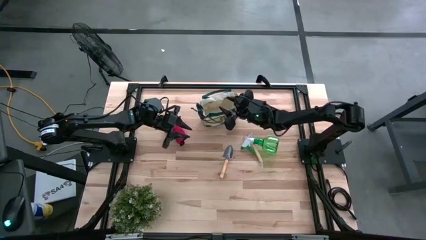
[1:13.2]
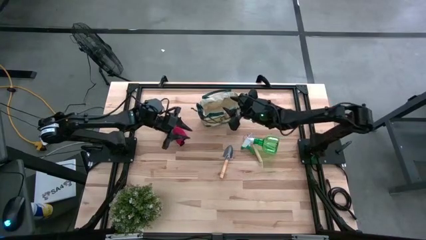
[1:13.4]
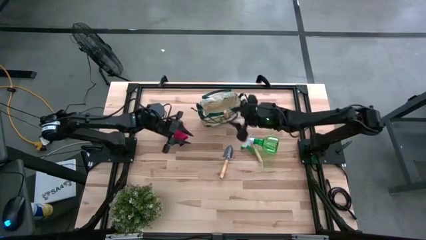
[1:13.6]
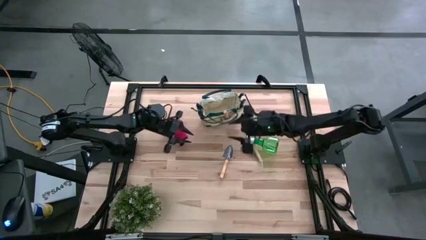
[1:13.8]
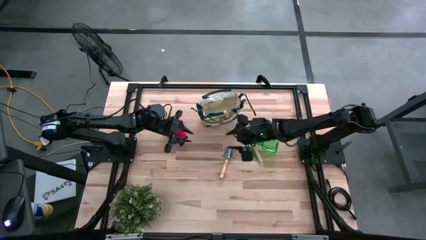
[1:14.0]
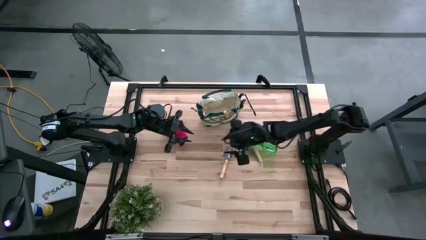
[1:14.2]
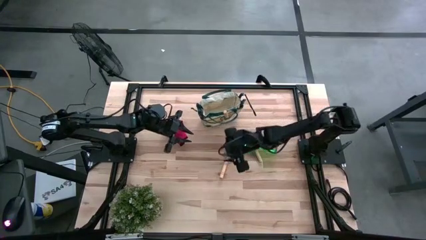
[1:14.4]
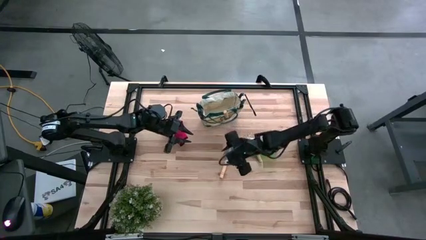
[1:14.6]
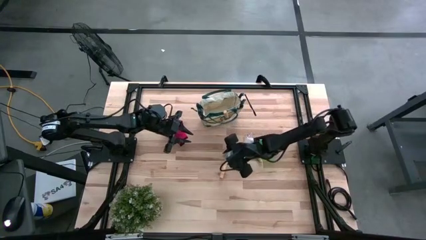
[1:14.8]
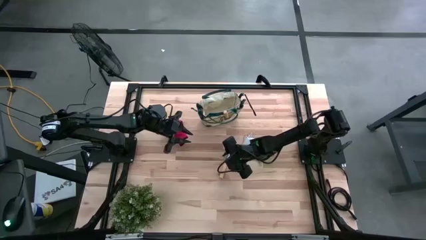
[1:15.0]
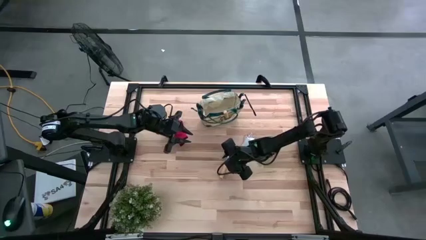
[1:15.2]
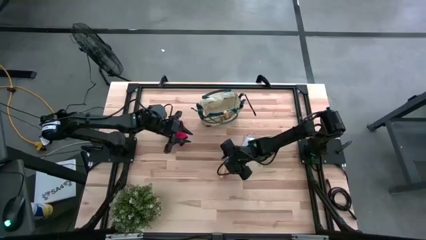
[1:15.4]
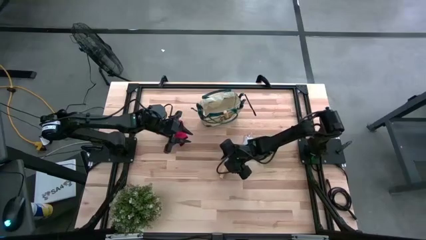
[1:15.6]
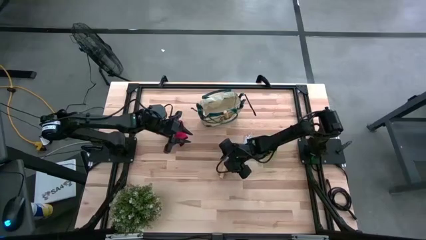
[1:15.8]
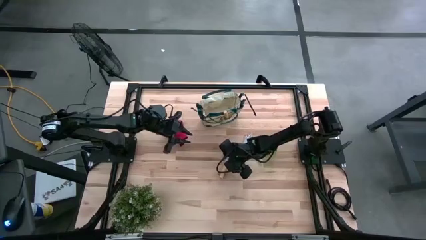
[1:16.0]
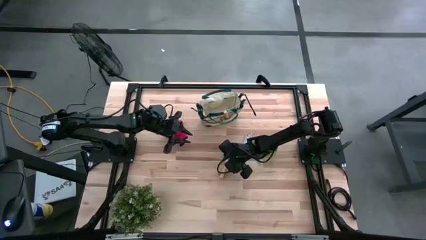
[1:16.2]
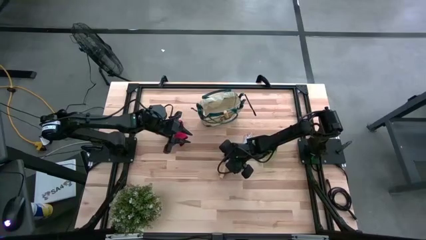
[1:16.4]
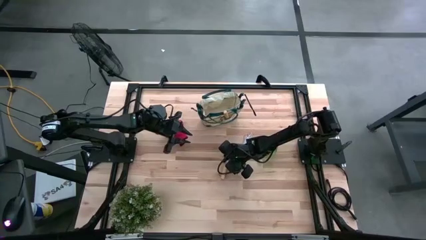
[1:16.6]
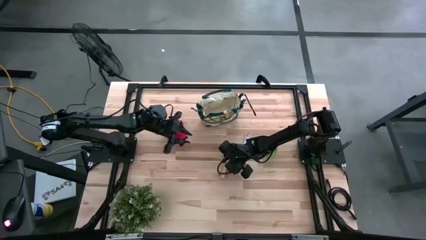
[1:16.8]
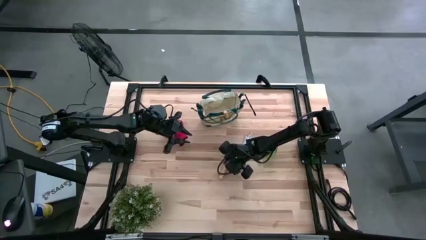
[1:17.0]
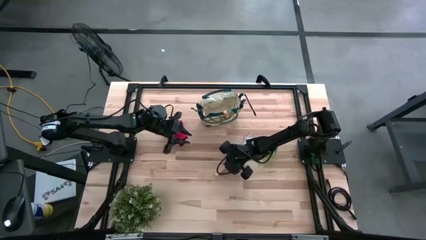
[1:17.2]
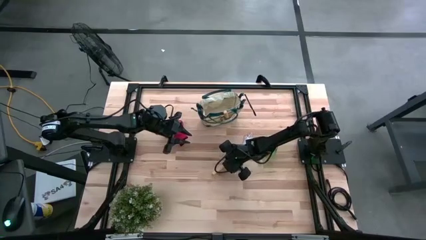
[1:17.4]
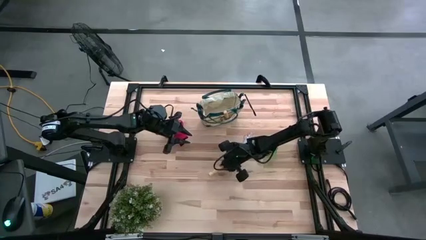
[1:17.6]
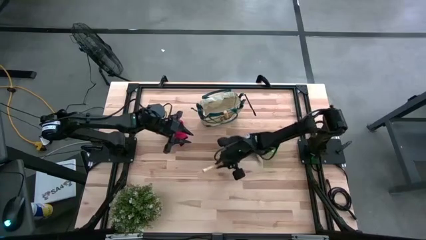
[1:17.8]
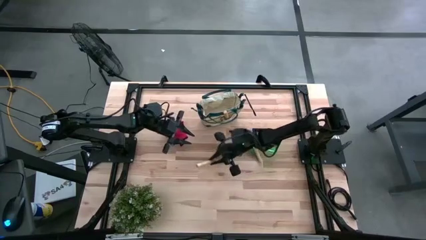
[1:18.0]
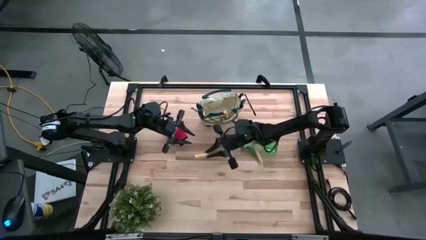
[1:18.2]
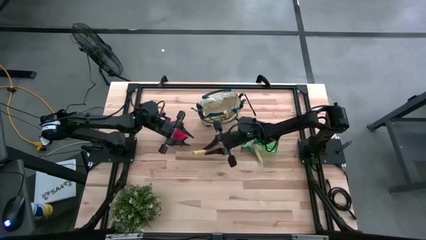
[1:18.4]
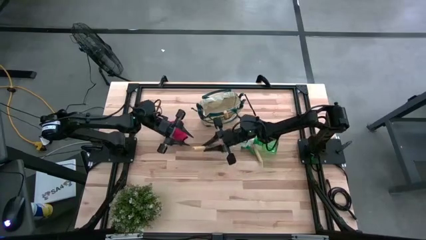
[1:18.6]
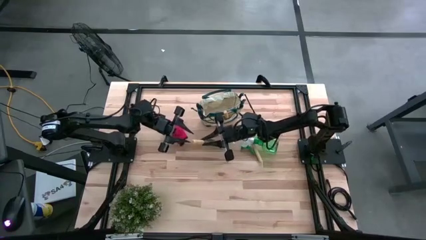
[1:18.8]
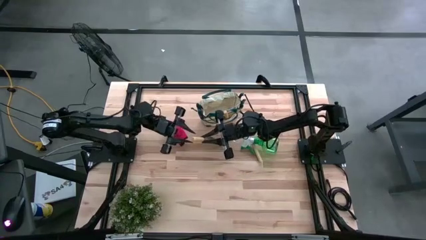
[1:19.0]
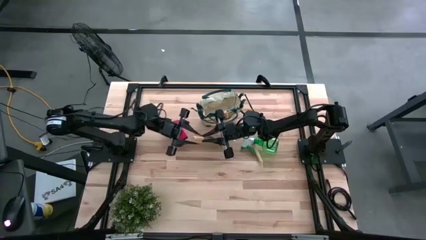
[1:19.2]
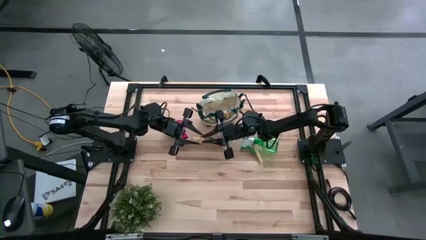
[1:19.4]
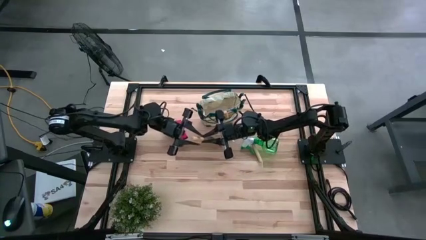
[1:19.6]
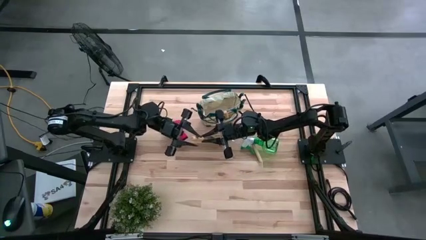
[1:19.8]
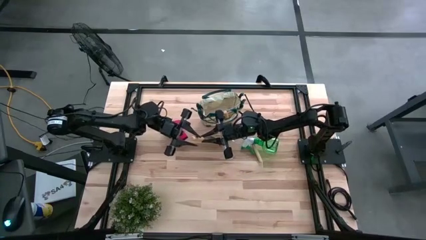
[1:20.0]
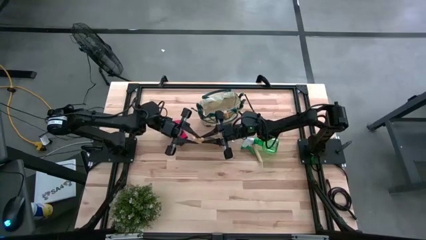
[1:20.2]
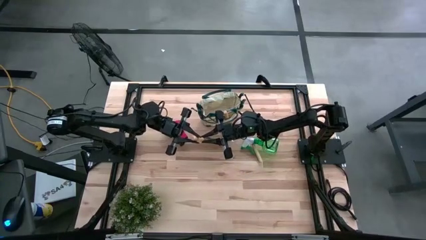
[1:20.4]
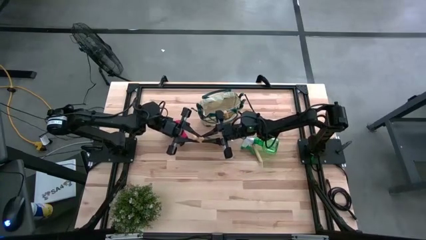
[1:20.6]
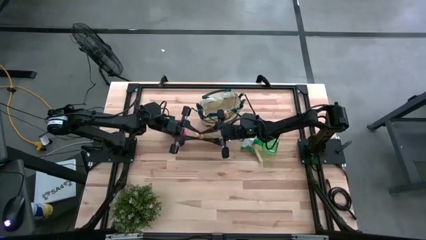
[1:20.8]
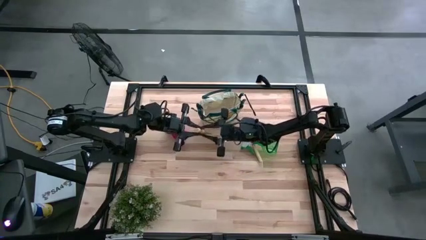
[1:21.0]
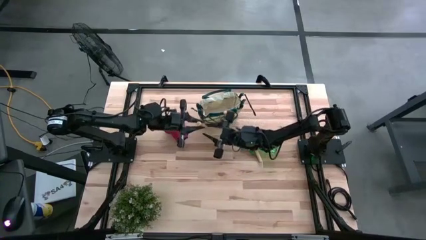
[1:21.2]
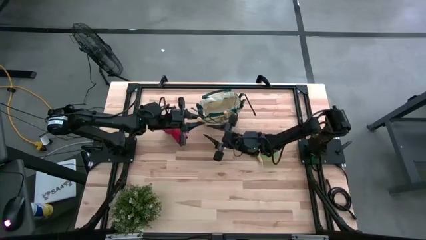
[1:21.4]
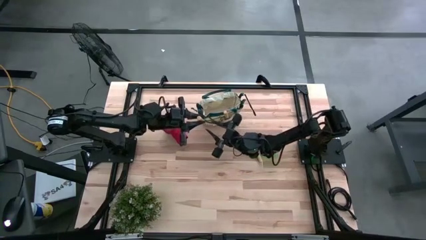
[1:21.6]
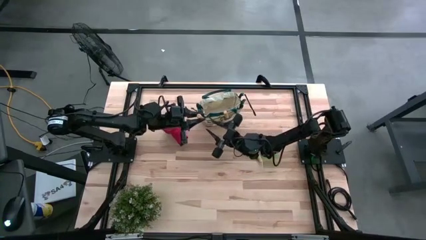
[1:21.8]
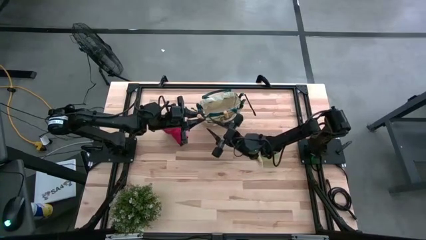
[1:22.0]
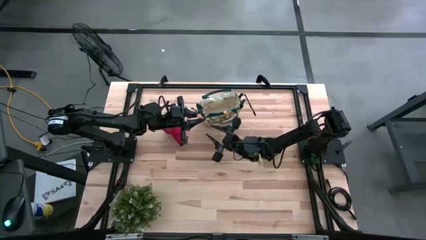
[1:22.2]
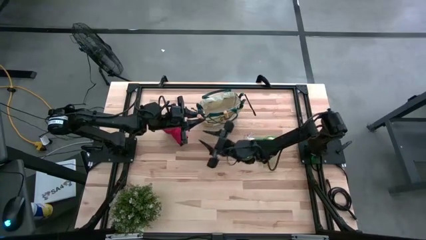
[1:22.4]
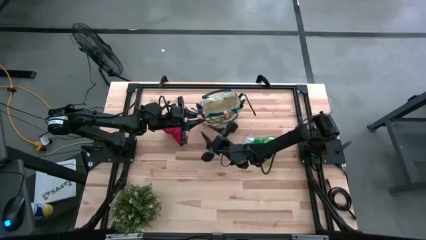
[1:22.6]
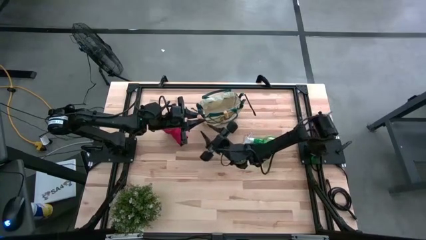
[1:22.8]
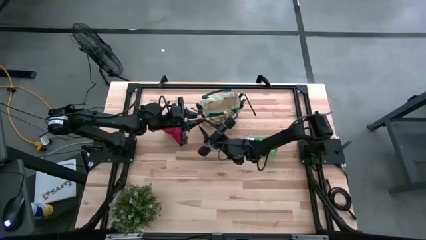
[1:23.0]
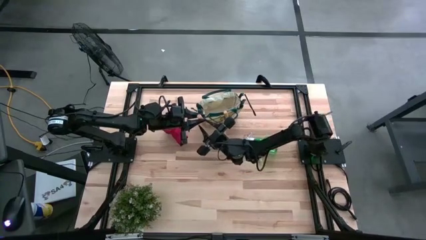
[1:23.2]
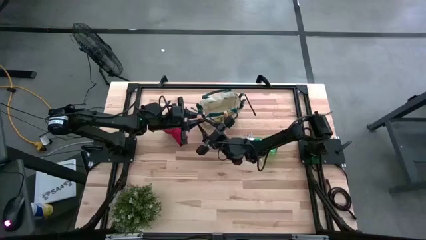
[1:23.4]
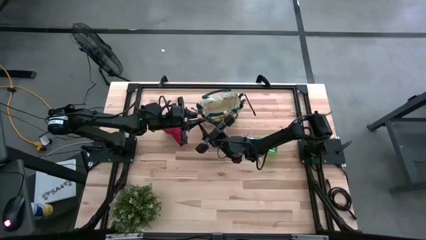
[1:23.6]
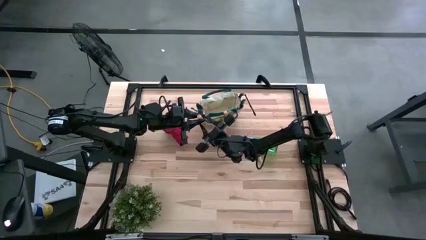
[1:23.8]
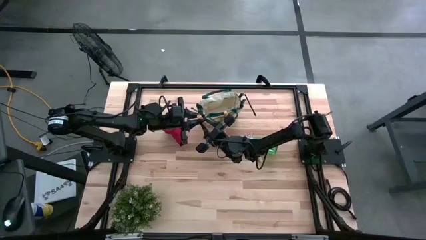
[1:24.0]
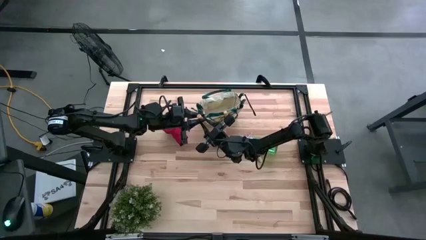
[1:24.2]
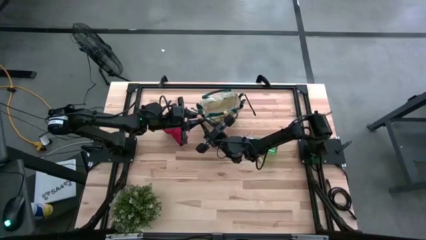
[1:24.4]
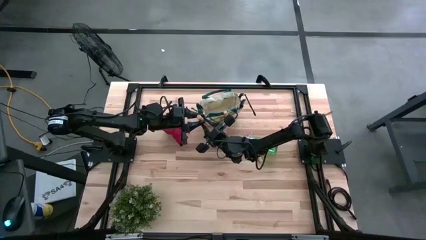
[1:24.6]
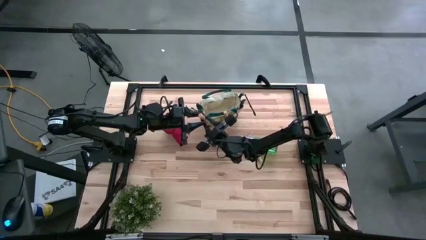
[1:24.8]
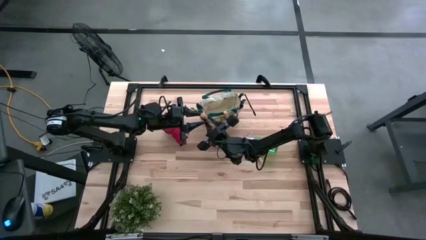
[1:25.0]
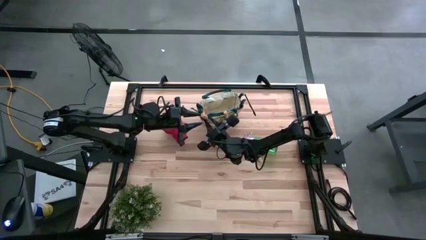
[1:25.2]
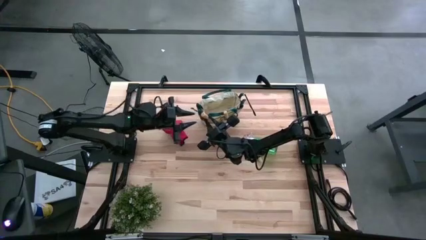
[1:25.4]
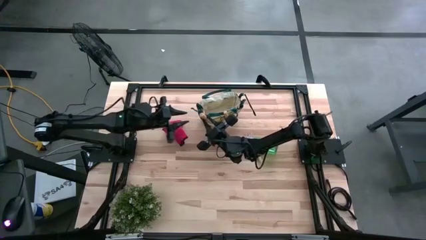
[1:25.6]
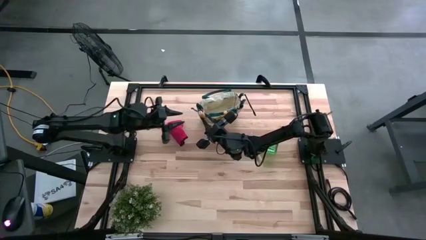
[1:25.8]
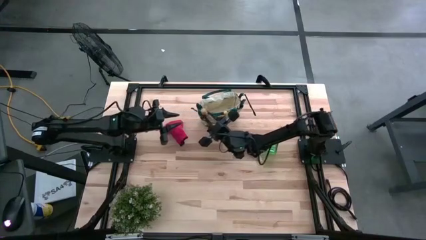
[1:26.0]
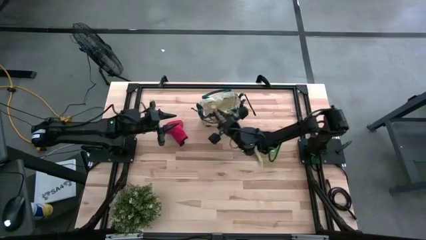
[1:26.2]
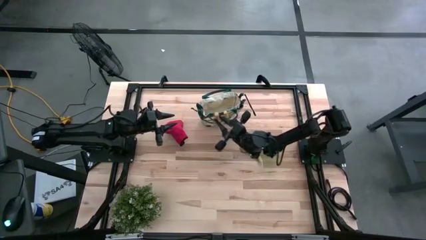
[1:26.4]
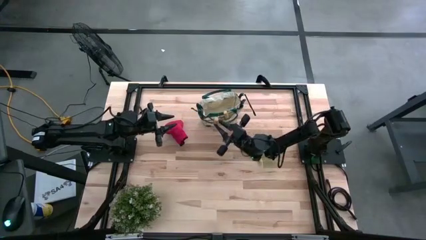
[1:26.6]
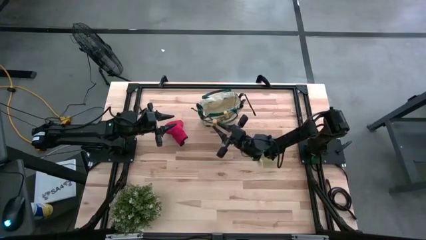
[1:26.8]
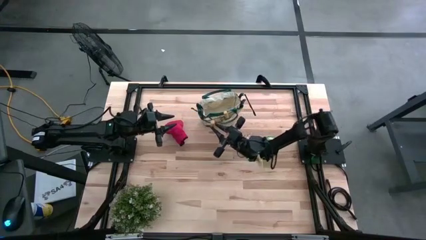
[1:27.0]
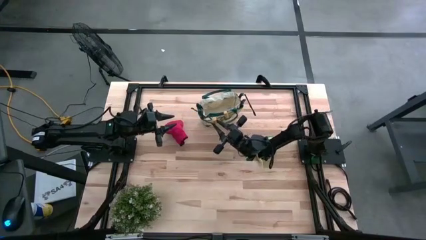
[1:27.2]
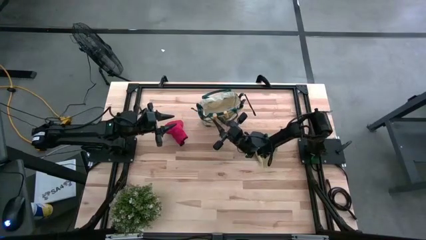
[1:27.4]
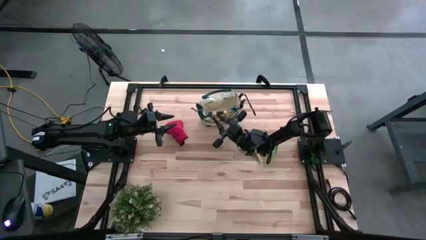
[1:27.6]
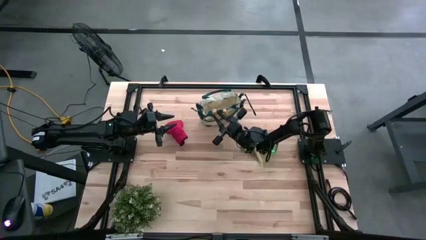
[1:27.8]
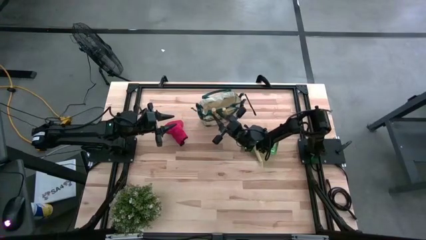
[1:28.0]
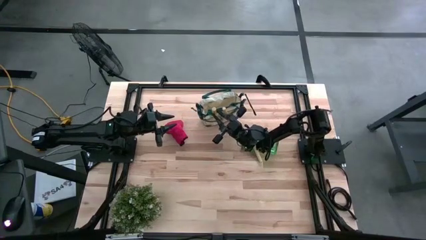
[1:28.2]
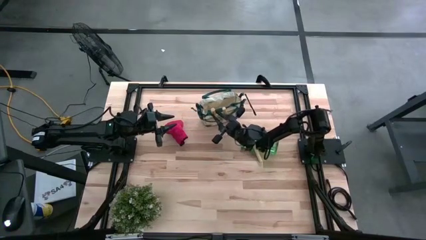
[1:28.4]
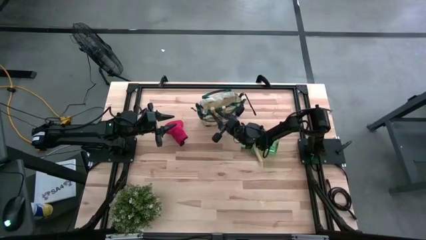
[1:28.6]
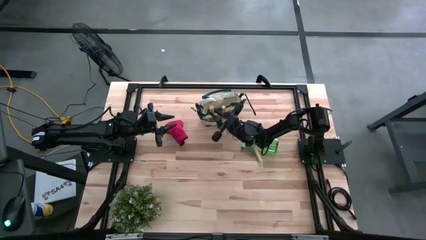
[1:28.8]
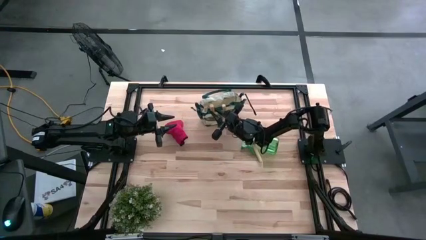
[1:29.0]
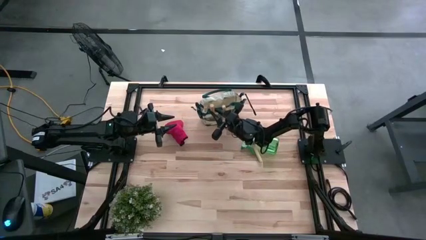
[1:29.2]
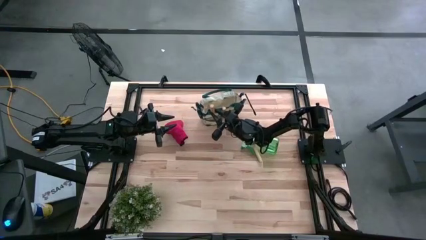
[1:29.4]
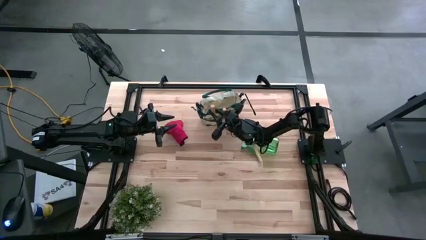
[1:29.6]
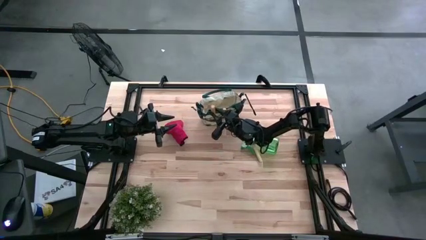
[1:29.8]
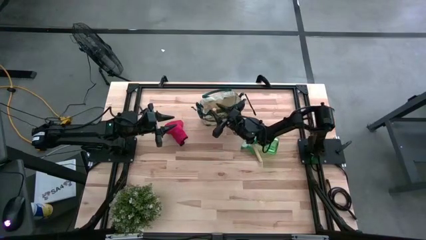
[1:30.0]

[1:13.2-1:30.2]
Task: Pick & Place Garden tools in Gardening bag
Put the brown trowel into the gardening bag
